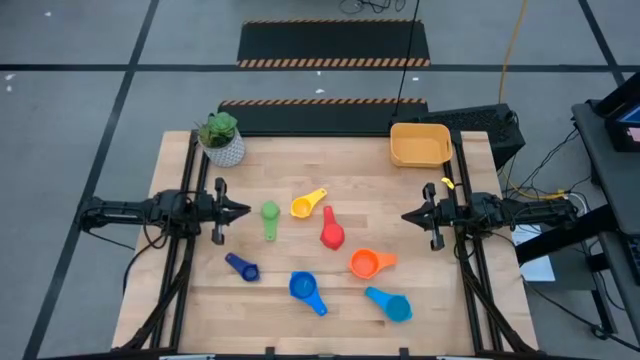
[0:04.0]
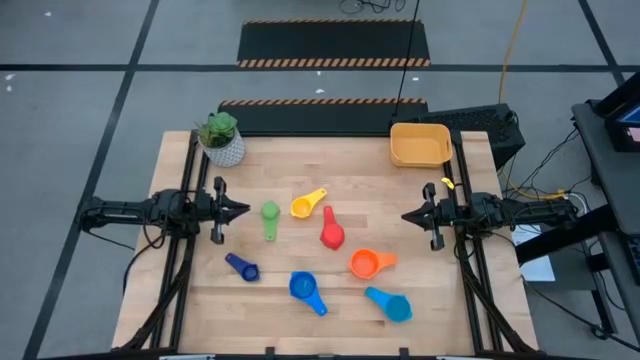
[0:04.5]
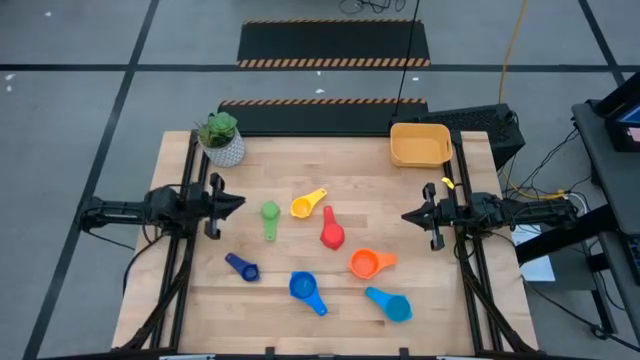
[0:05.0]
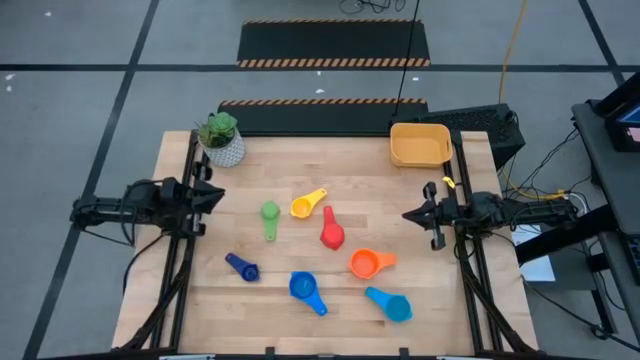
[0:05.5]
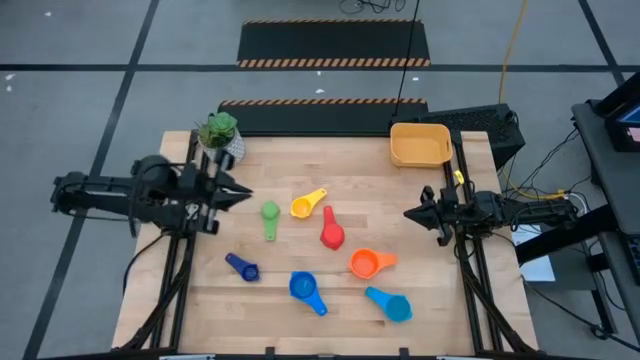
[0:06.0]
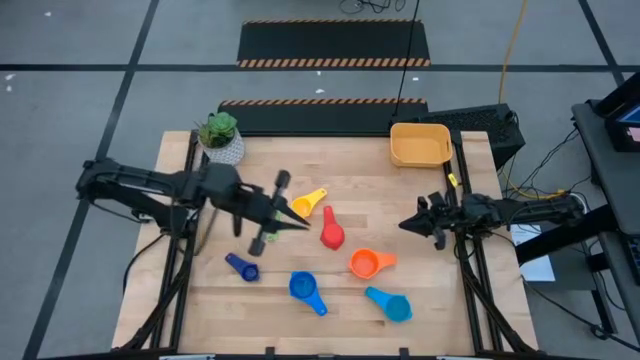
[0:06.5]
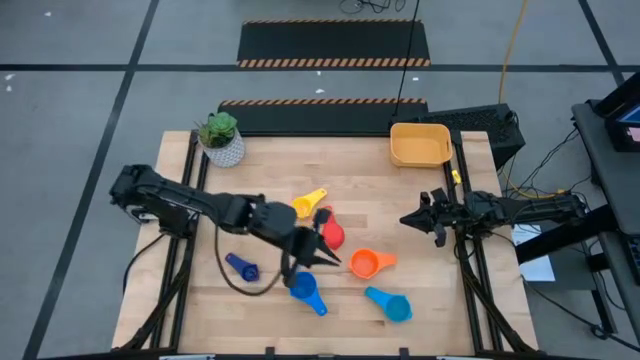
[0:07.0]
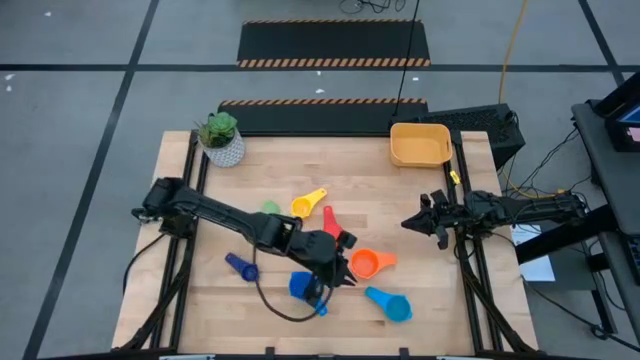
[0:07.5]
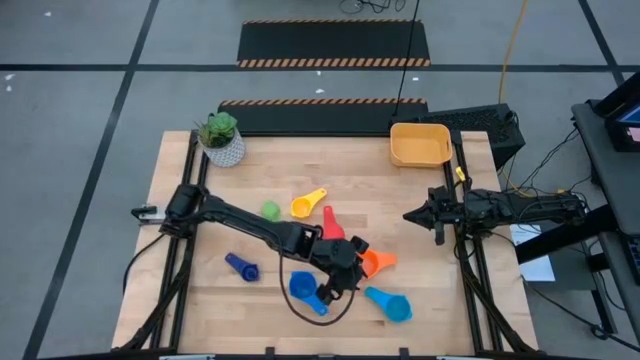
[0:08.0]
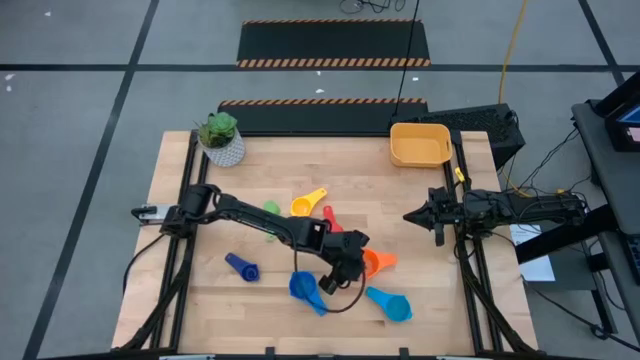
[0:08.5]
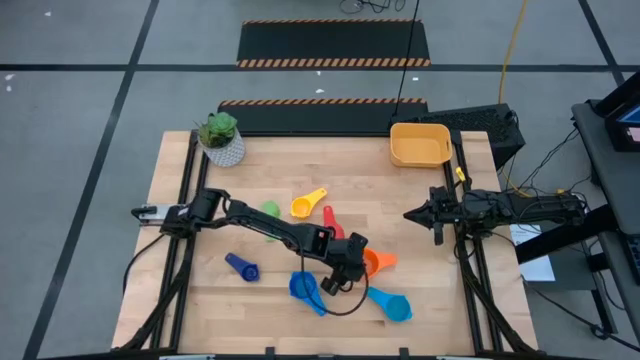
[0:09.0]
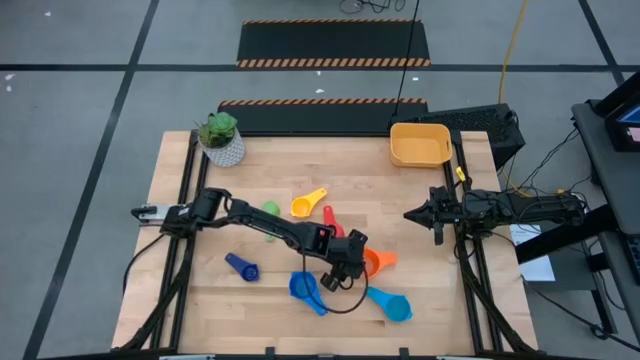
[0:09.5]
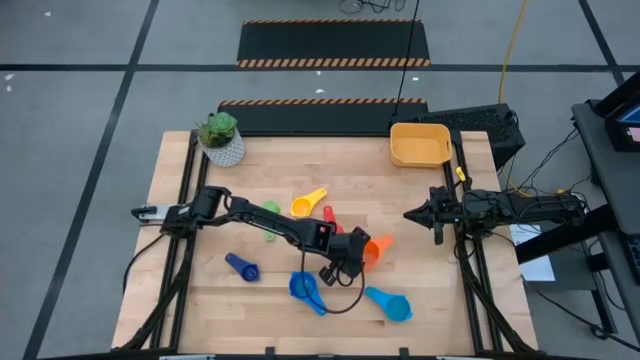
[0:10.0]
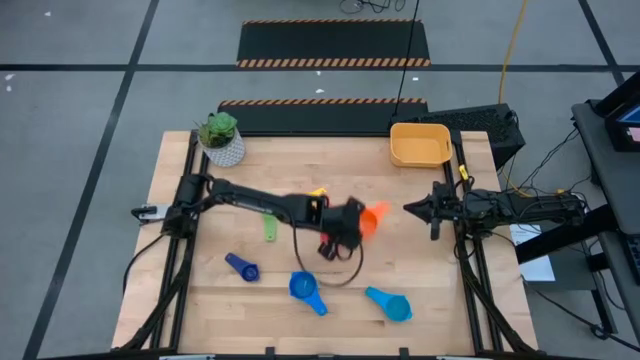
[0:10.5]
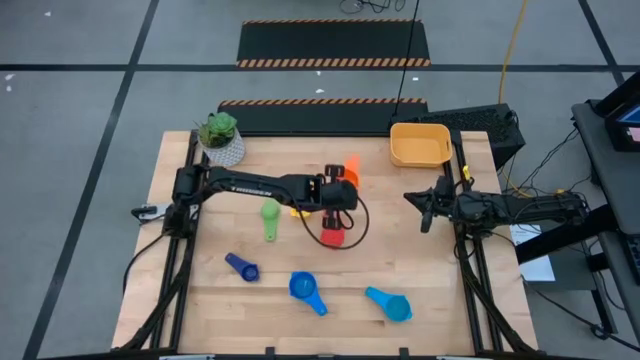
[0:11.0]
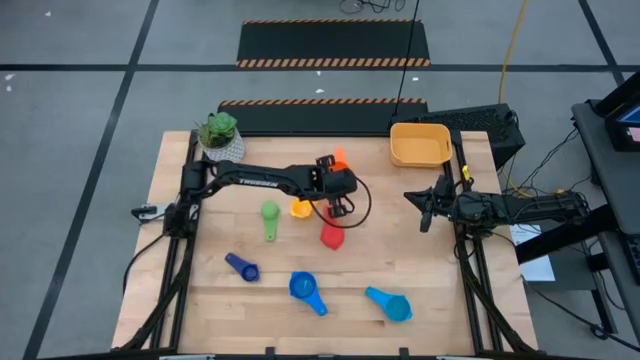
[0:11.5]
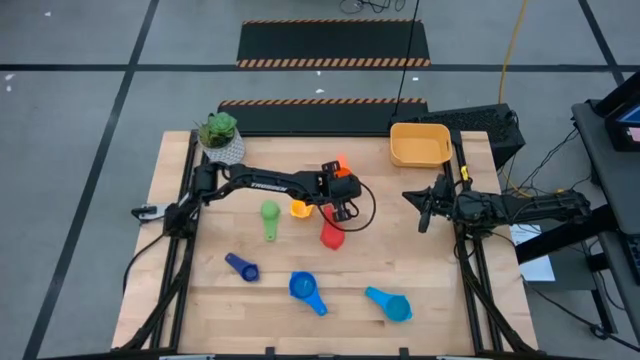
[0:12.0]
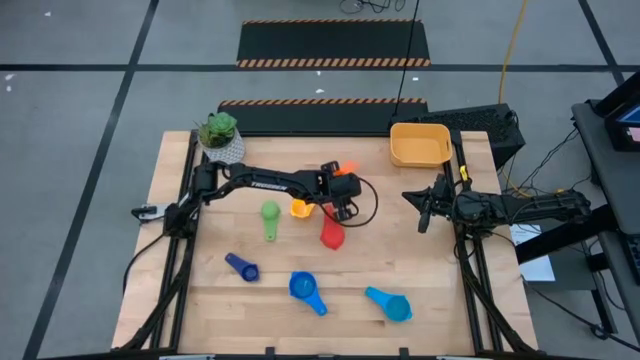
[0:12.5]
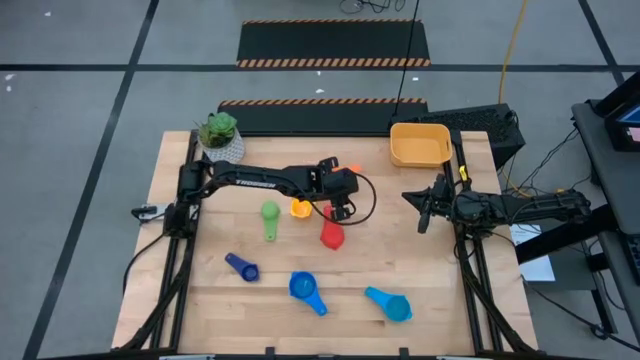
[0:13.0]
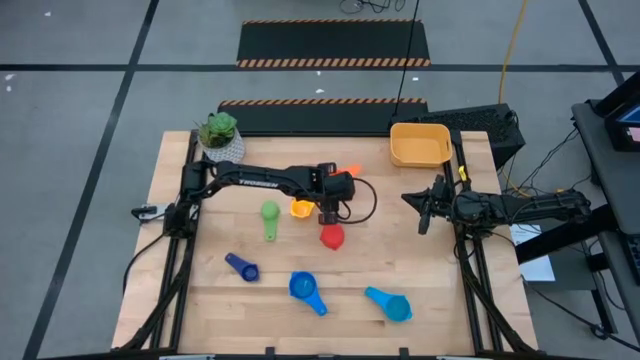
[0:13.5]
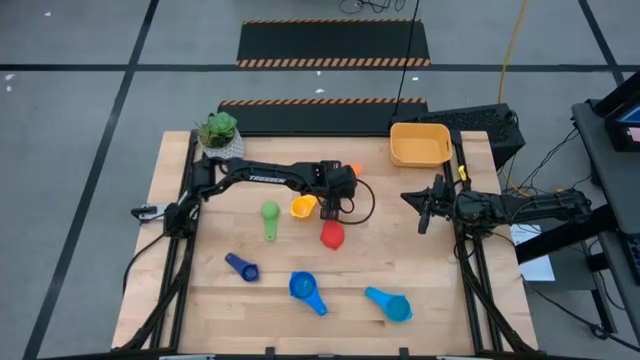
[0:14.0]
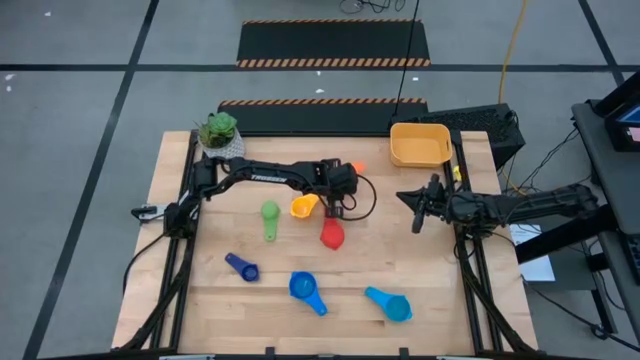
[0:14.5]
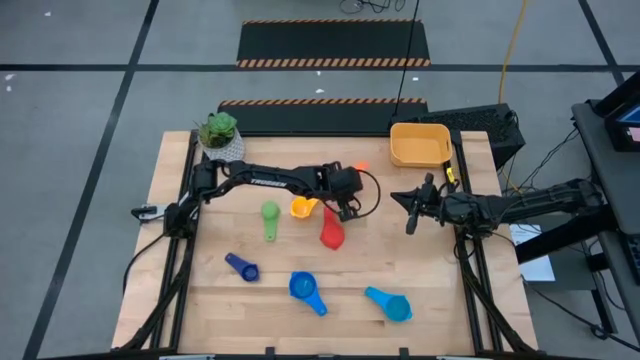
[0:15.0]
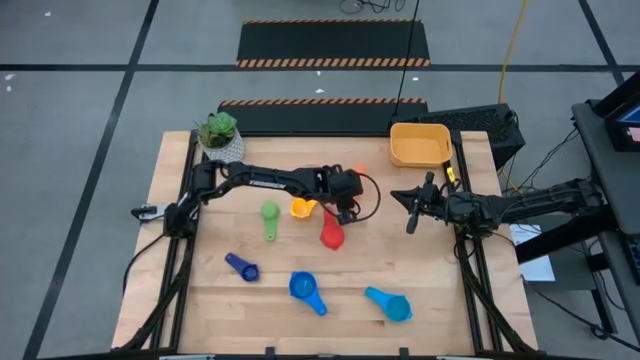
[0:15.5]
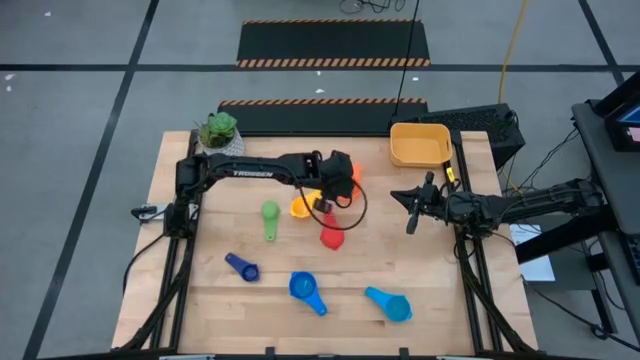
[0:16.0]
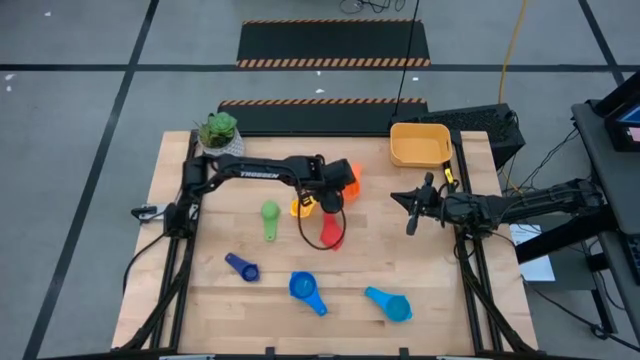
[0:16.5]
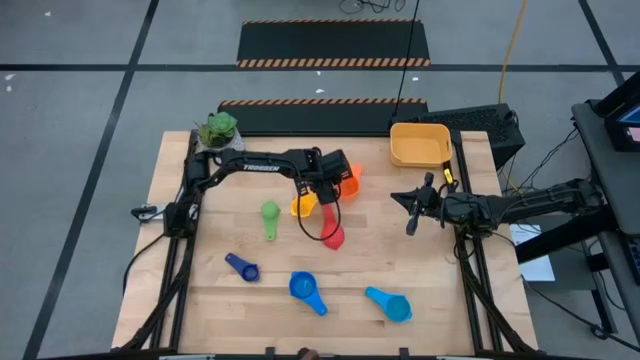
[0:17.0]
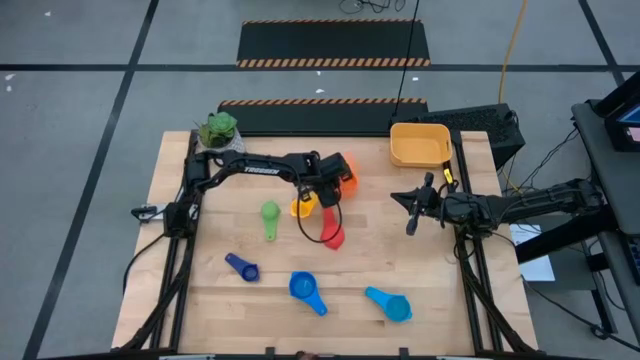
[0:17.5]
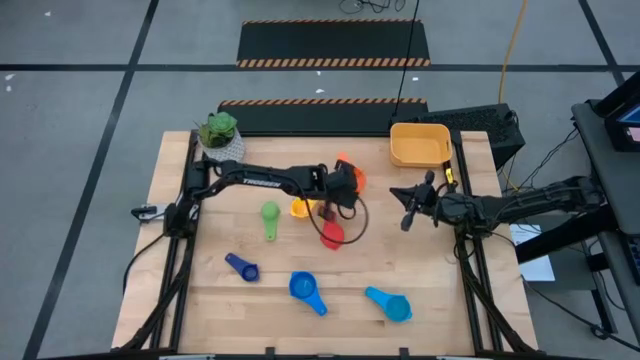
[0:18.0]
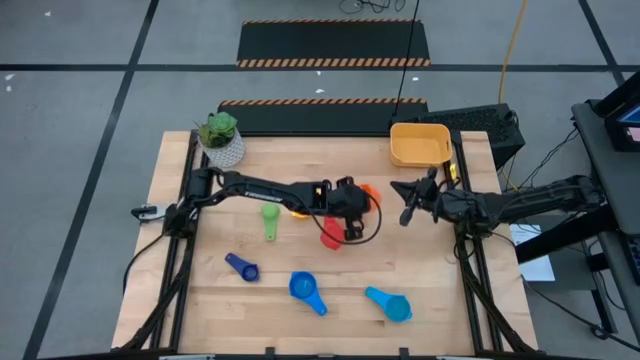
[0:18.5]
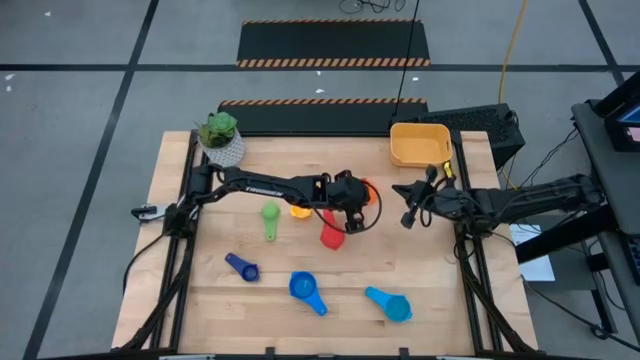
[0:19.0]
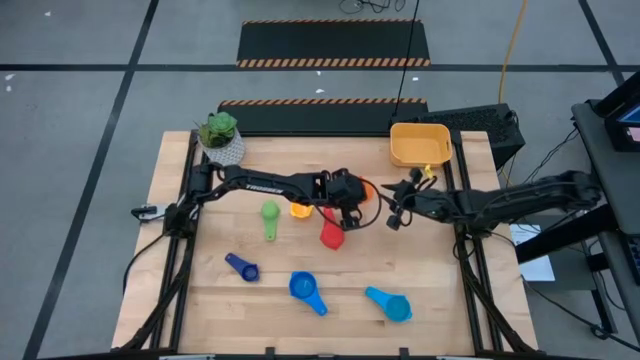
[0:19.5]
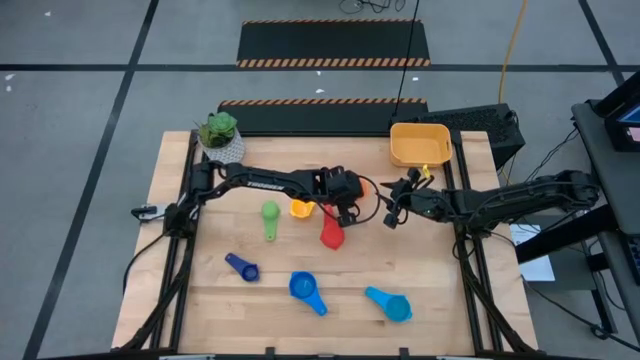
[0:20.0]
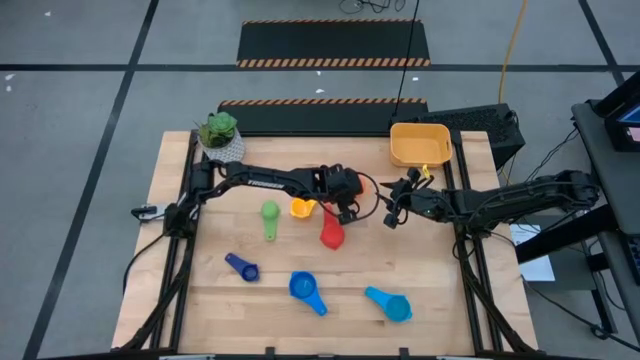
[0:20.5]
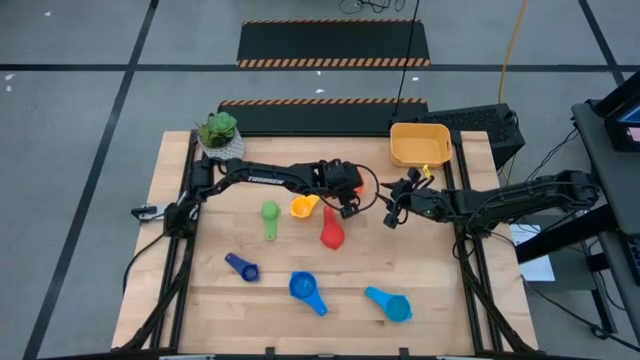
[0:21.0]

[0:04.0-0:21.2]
Task: Nest measuring cups in basket
Put the orange measuring cup into the yellow bin
